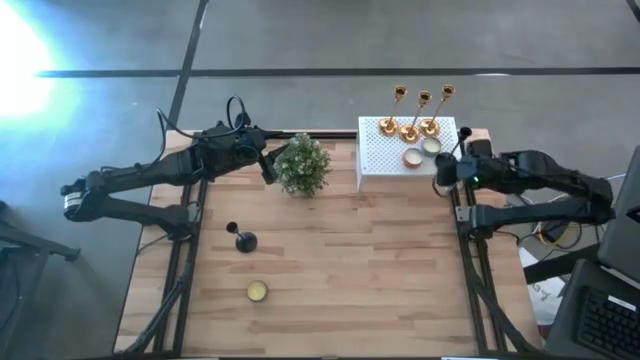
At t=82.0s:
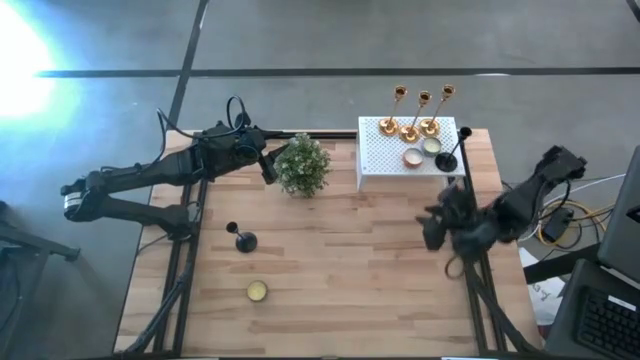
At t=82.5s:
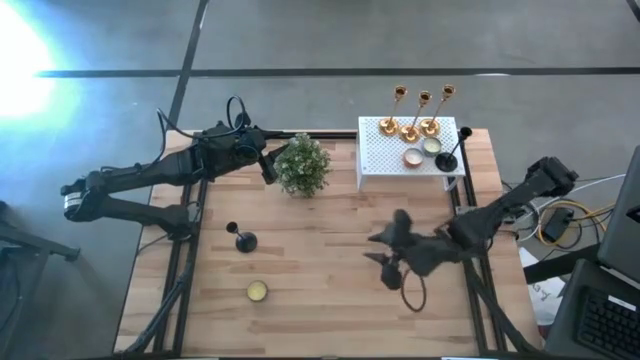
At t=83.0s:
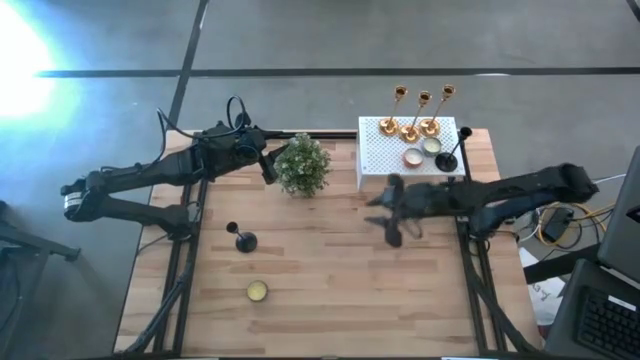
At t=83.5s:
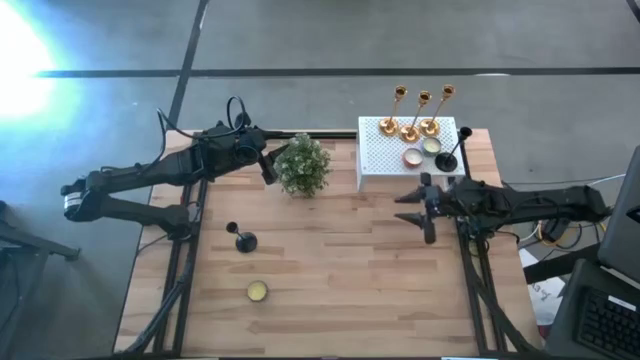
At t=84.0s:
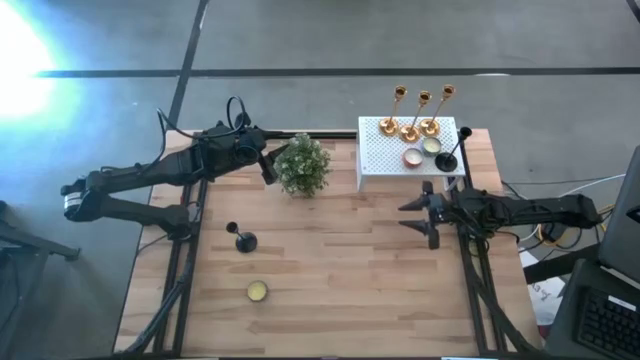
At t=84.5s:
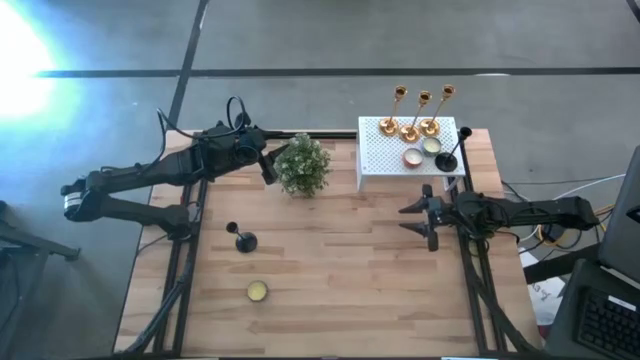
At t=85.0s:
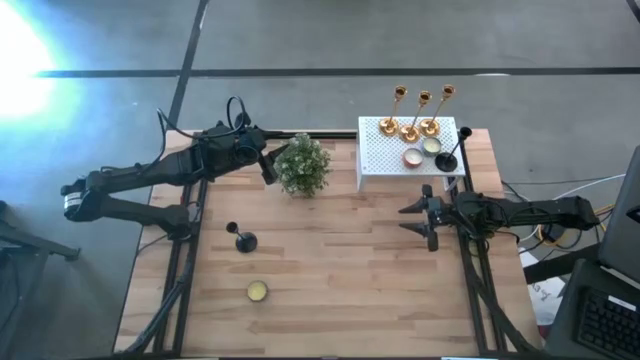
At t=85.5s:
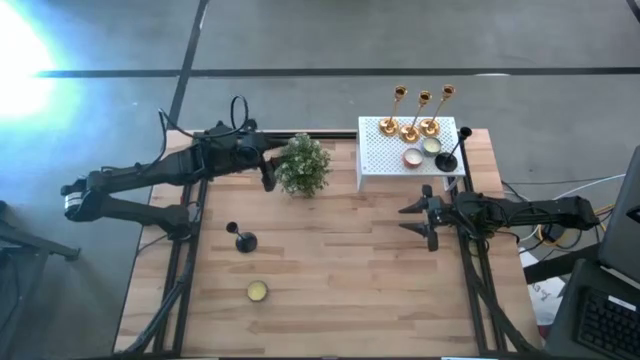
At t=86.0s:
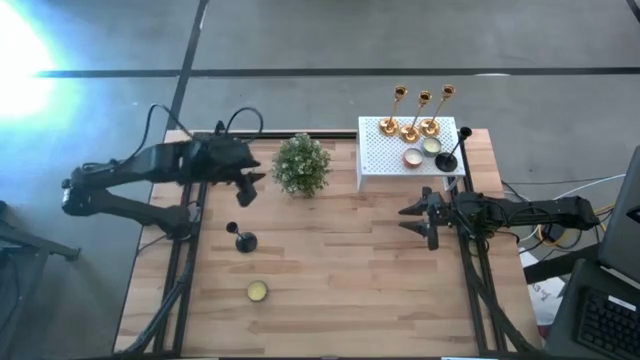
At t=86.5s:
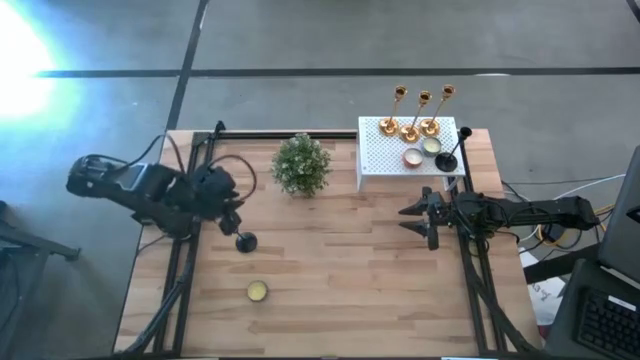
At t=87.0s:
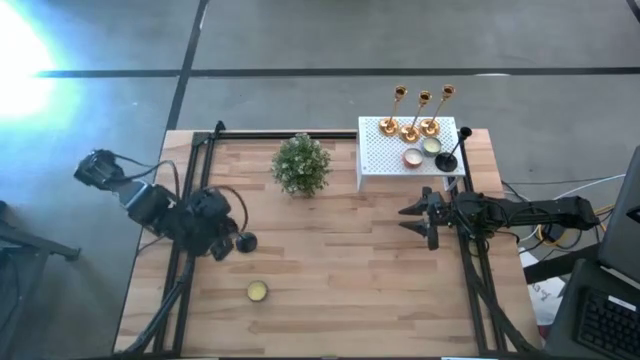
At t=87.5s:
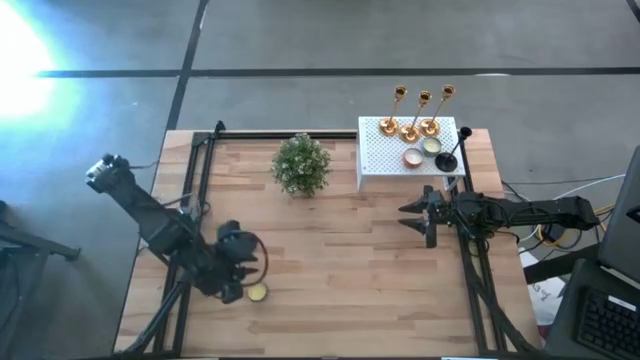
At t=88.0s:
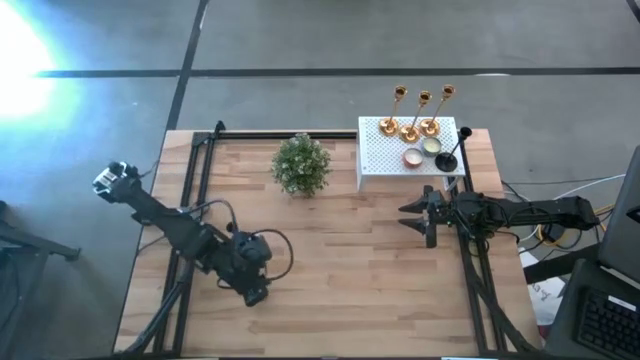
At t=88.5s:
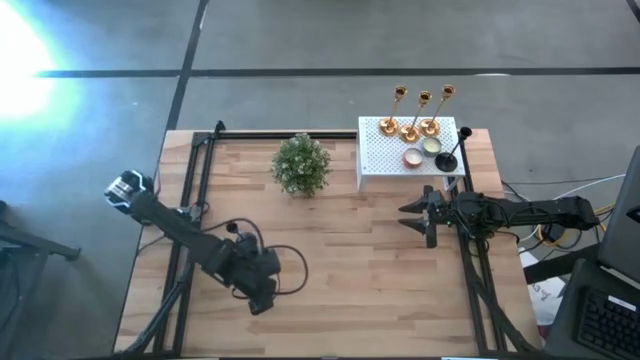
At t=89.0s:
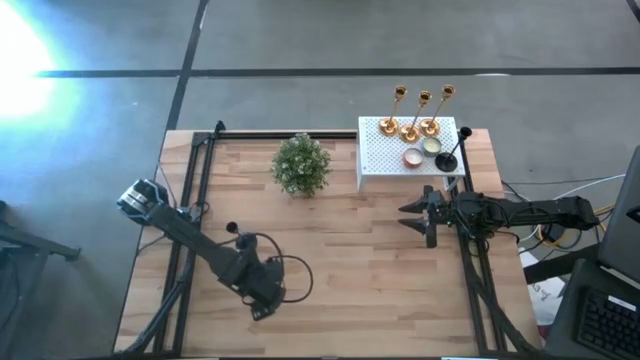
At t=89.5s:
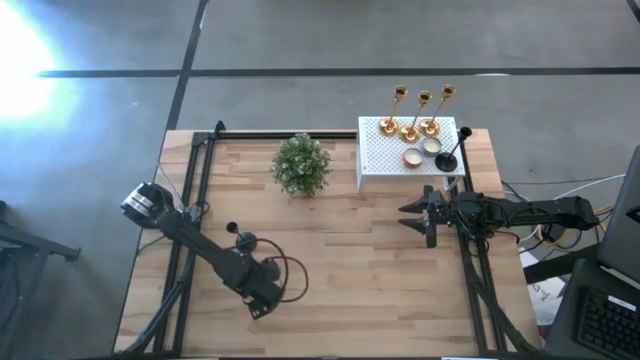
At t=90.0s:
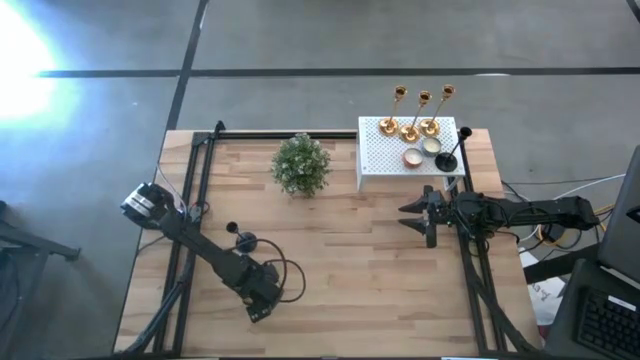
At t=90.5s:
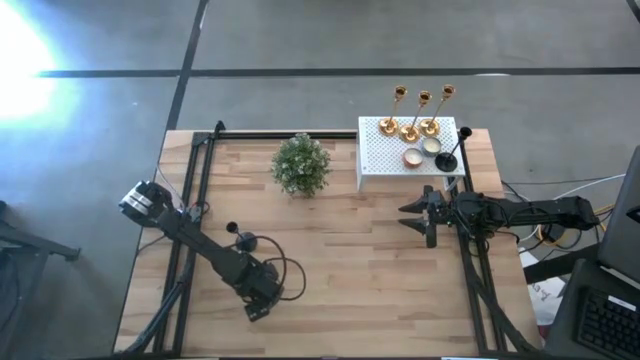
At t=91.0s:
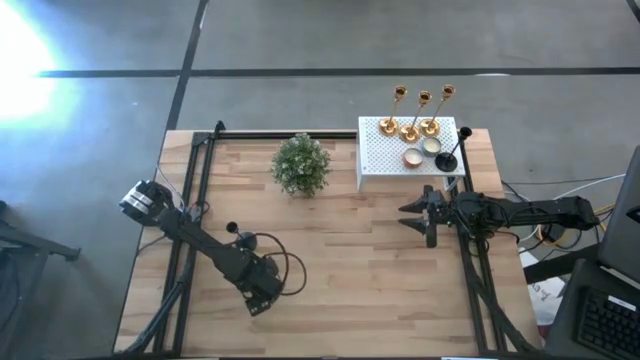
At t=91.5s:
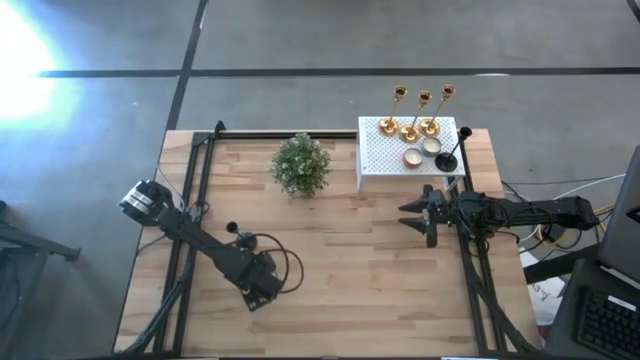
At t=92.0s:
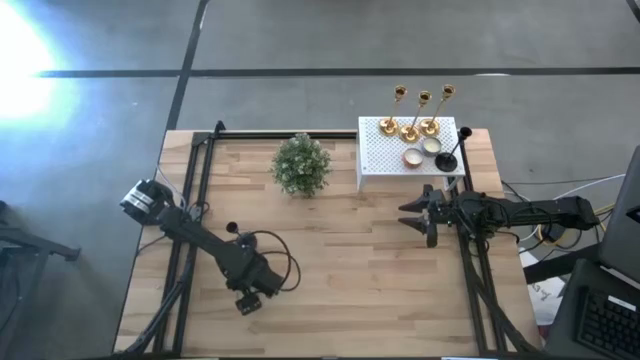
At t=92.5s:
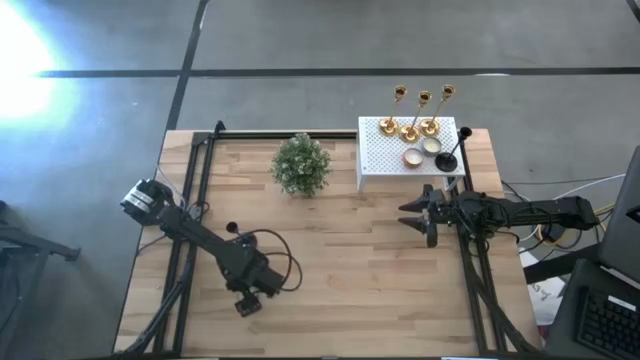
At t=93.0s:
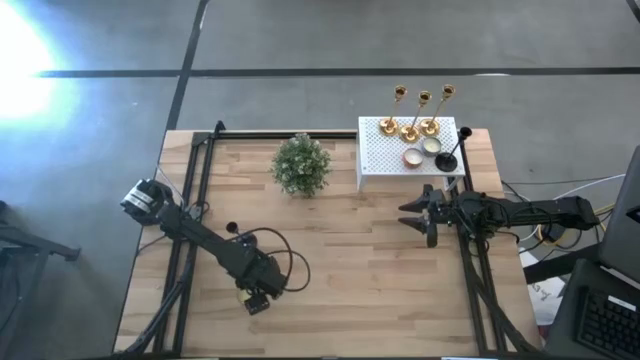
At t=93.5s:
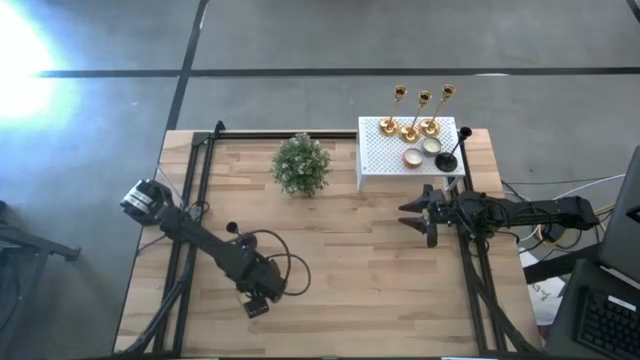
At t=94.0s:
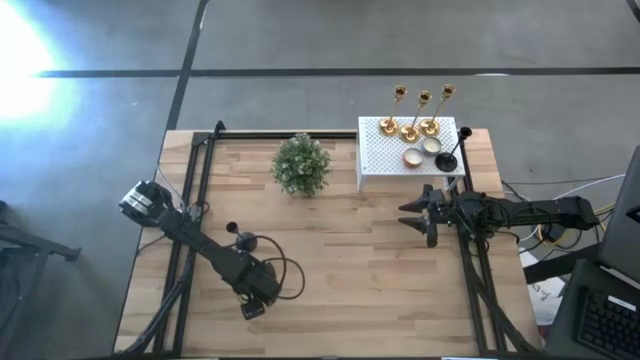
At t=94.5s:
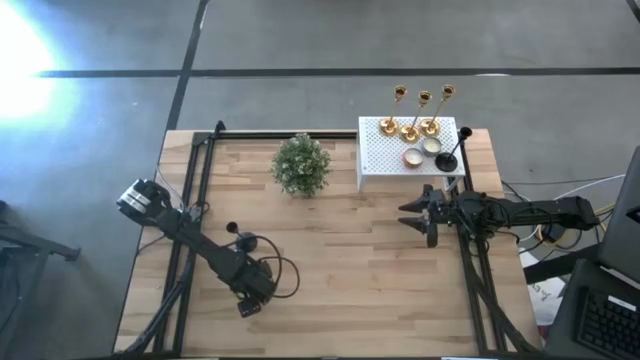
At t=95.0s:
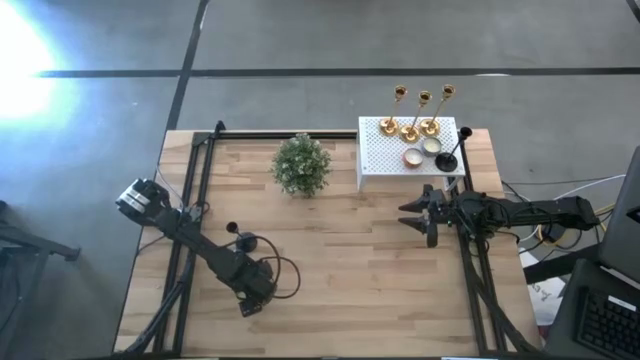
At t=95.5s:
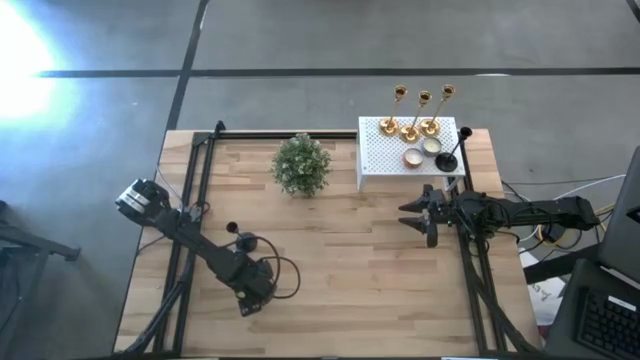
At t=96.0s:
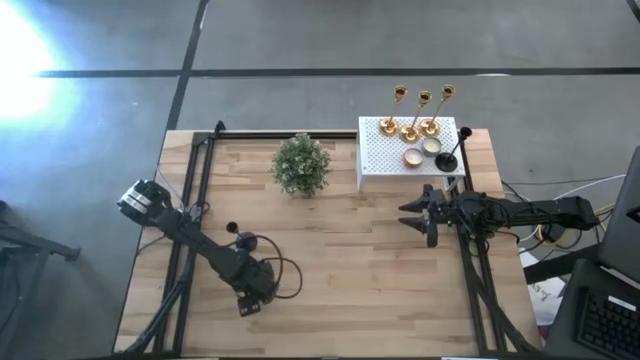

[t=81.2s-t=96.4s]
Task: Pick & Place candle stick holders
Put the red scented candle on the shelf
